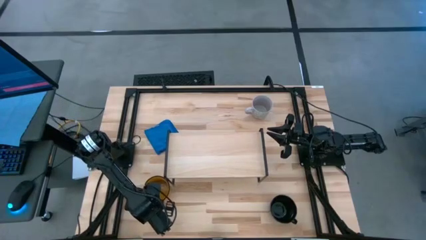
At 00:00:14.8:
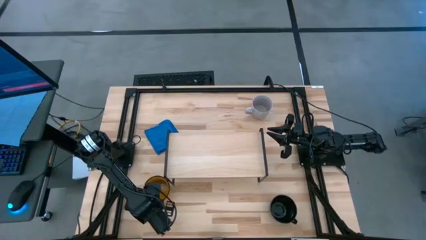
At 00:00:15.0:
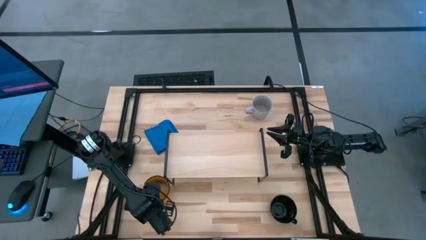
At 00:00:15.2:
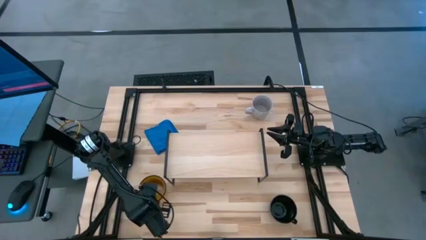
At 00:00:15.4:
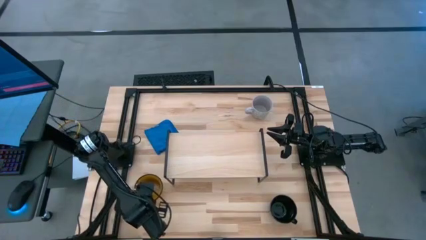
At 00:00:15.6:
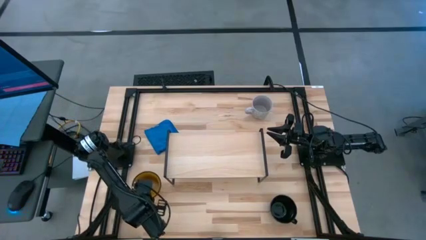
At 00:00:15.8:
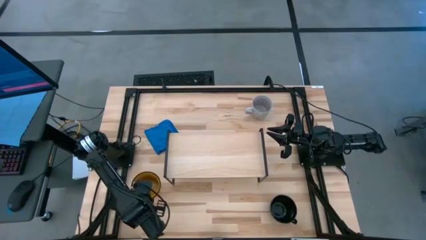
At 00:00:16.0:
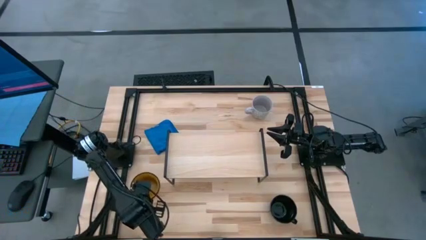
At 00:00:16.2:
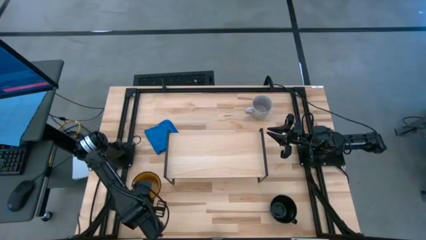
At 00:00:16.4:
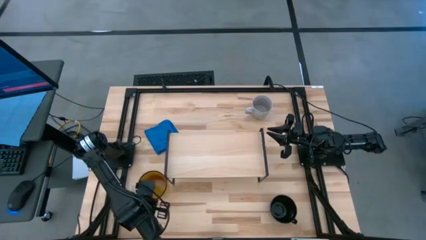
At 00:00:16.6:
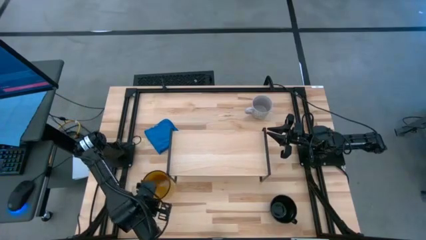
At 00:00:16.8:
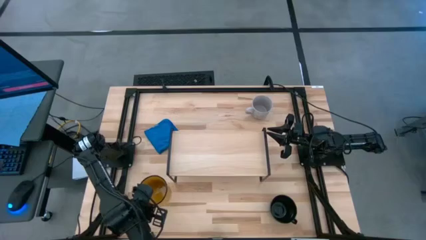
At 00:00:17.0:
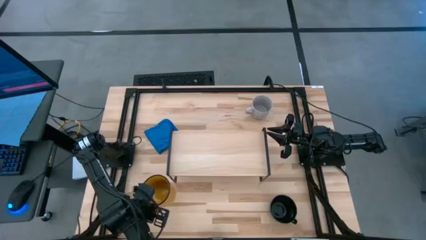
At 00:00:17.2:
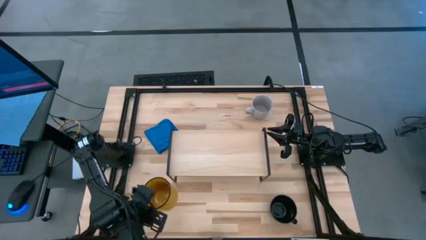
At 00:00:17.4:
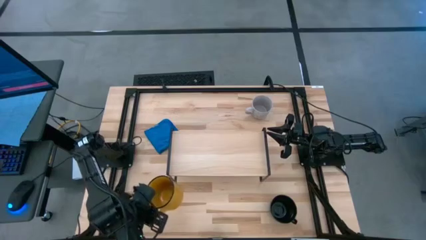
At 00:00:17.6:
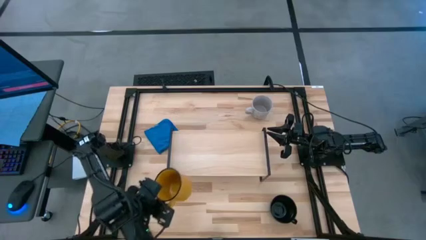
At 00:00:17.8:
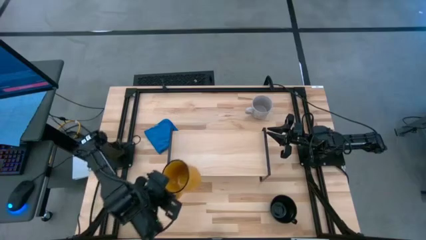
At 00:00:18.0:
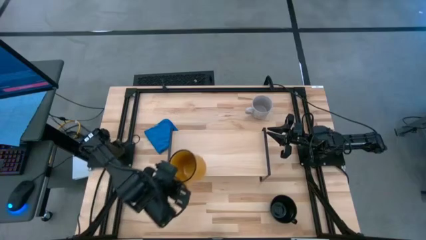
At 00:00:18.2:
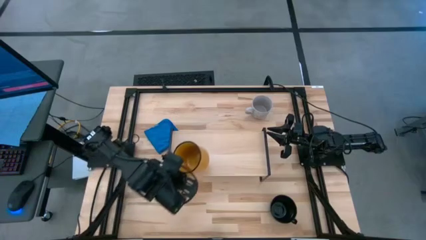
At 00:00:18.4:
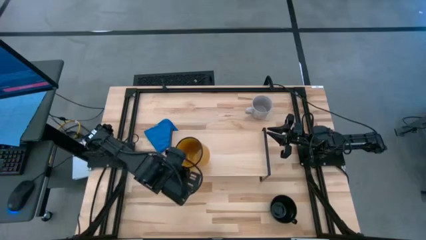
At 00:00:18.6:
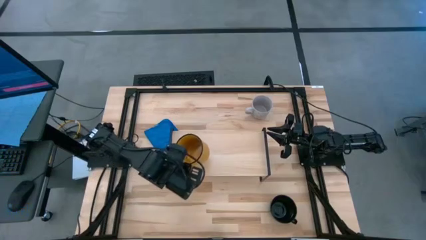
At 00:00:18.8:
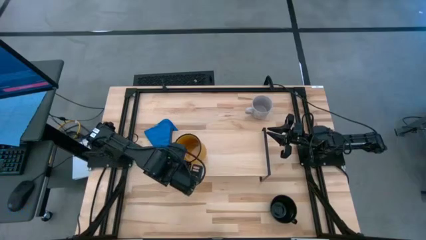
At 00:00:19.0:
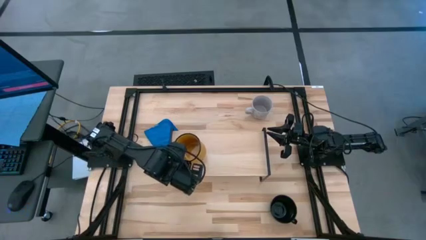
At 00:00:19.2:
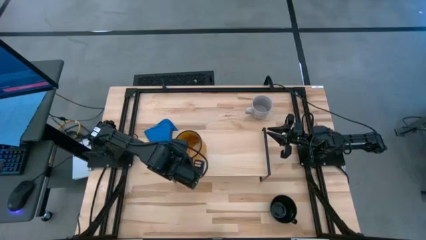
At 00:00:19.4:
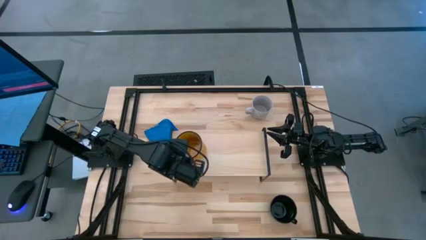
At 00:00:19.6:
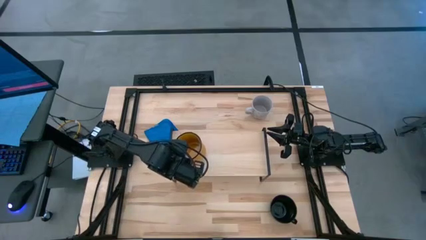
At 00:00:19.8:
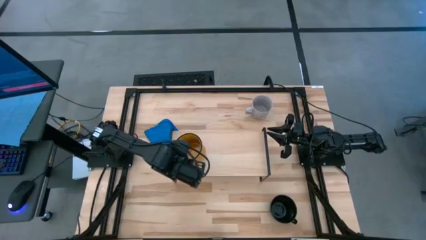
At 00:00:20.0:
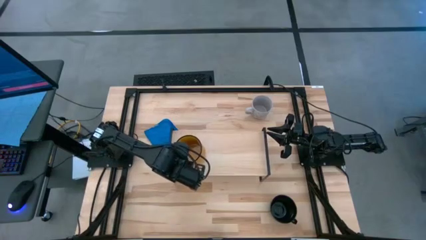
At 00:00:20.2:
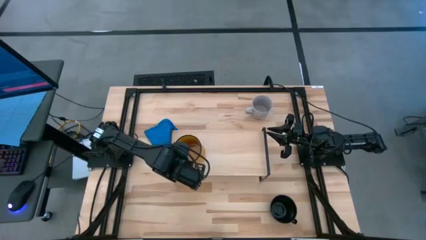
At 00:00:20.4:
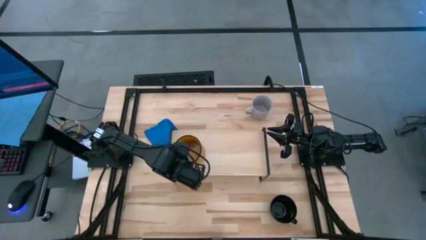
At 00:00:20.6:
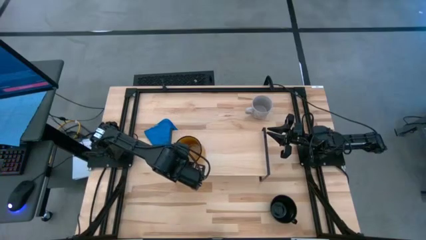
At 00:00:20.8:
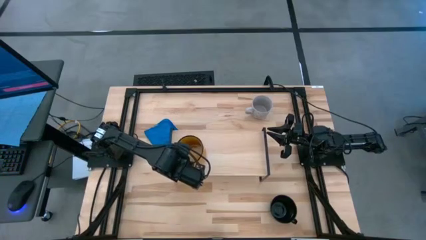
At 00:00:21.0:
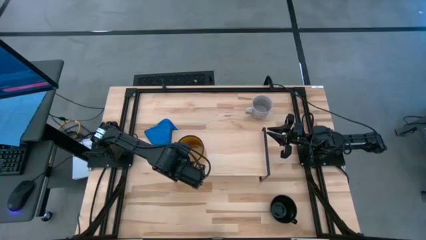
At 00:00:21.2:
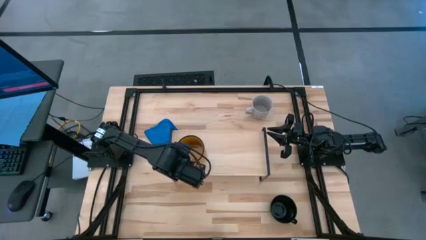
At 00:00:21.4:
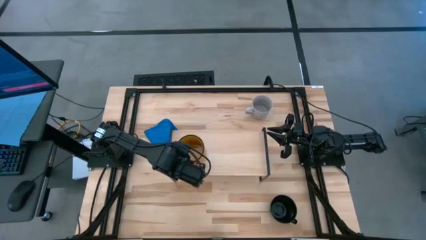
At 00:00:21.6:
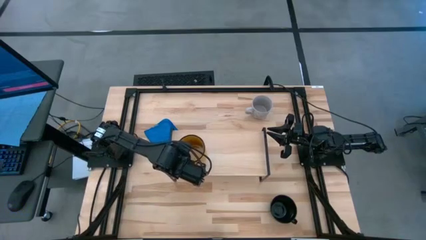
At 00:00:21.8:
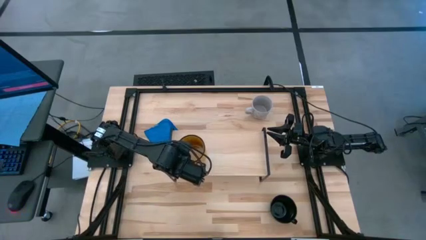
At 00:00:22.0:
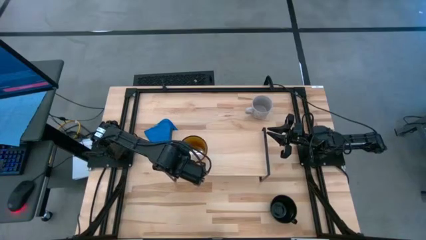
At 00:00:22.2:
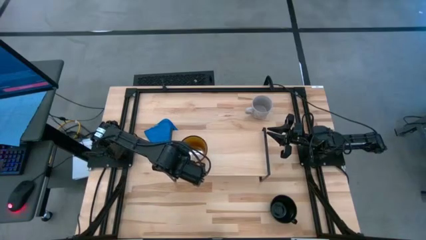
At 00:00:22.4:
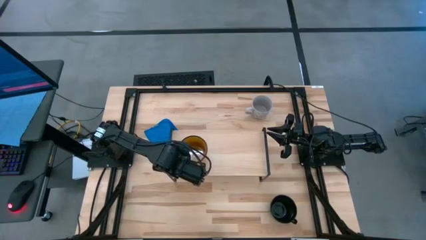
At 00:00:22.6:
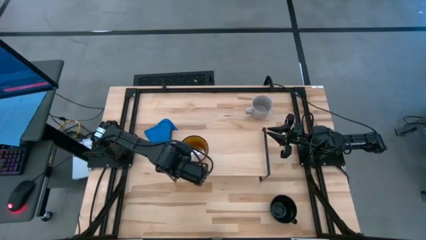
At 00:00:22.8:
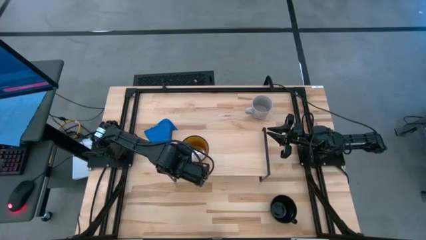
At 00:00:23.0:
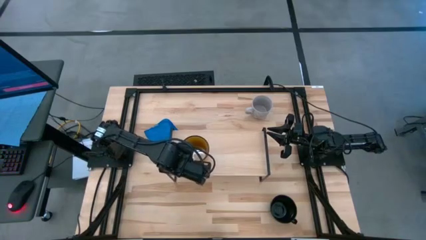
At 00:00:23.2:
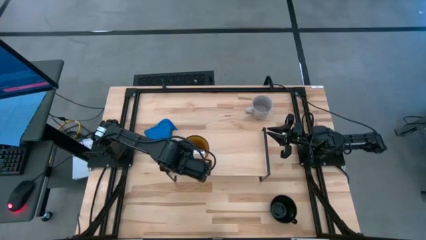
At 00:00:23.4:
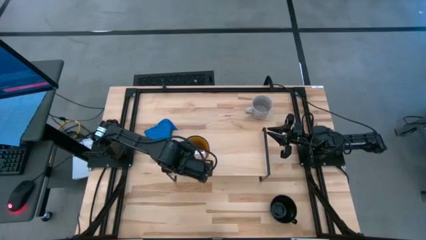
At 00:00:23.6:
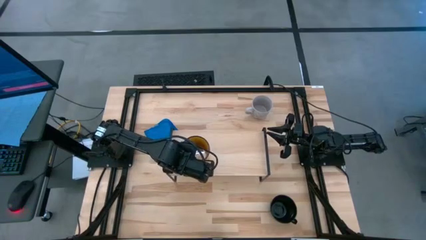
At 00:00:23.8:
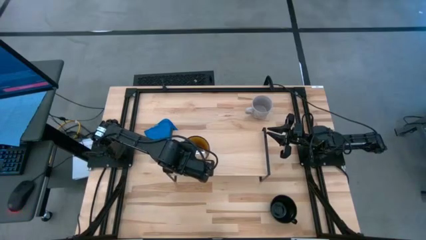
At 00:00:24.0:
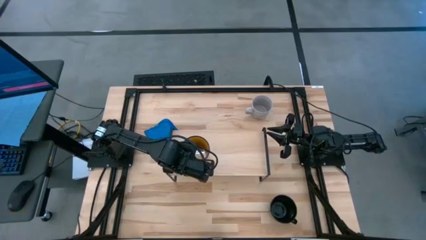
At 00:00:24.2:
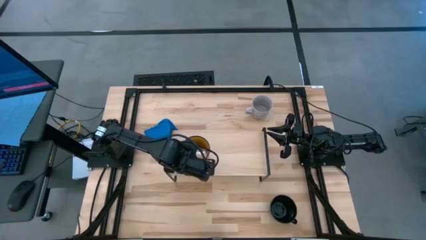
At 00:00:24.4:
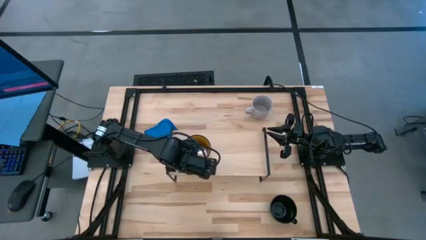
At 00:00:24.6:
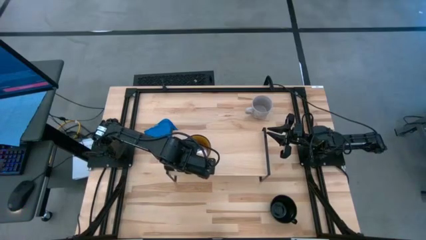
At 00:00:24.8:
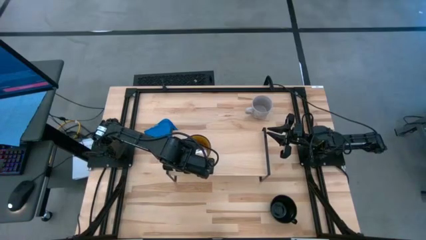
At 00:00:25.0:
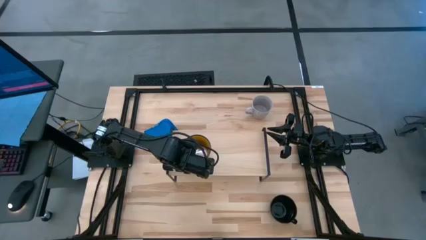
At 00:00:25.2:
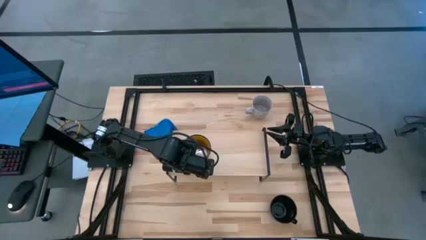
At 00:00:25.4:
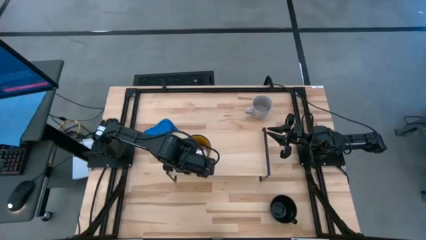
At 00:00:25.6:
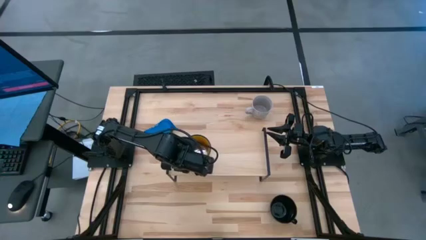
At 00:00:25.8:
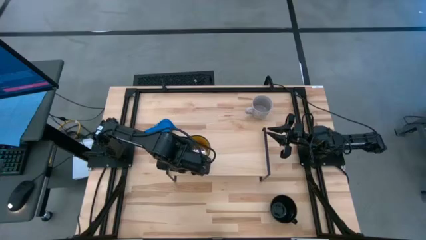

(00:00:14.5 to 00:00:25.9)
Task: Stack small to large cups/mugs on shelf
Put the yellow cup on the shelf

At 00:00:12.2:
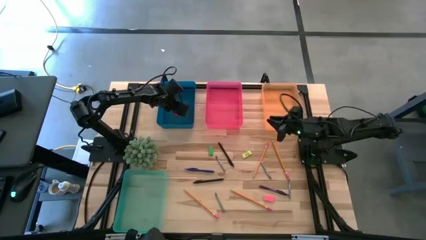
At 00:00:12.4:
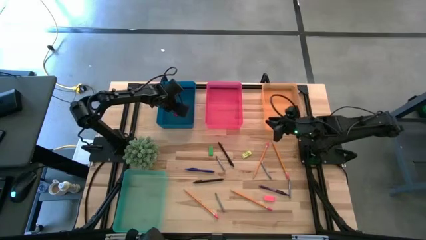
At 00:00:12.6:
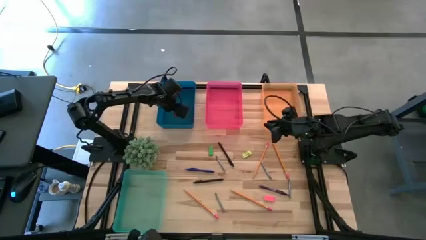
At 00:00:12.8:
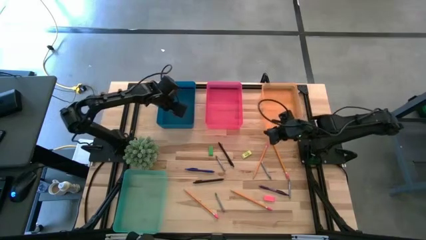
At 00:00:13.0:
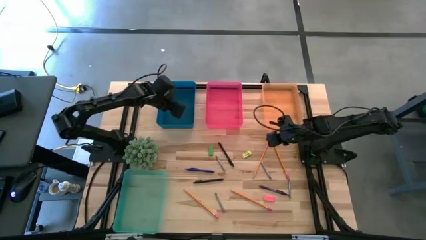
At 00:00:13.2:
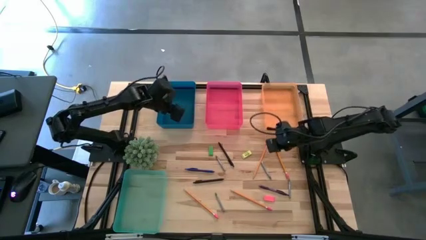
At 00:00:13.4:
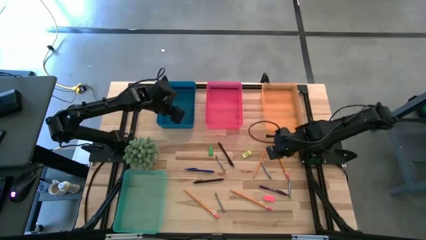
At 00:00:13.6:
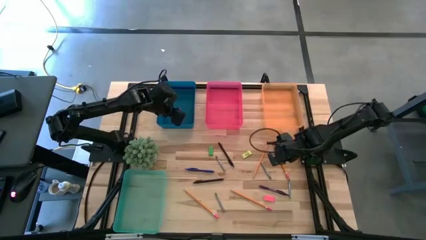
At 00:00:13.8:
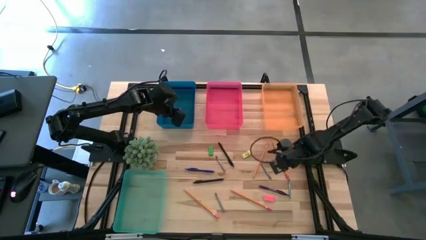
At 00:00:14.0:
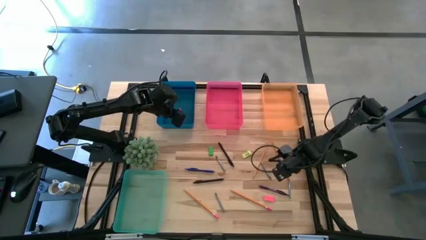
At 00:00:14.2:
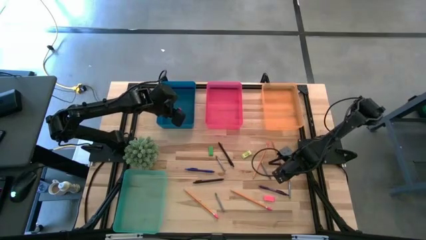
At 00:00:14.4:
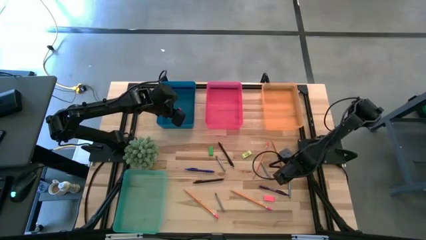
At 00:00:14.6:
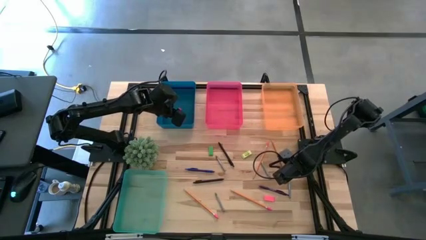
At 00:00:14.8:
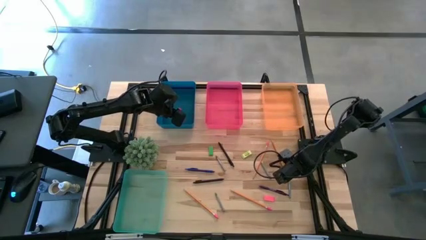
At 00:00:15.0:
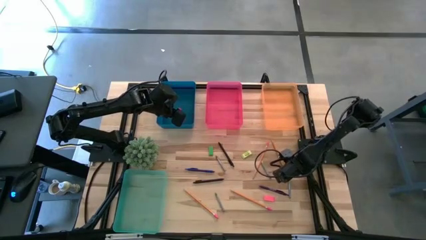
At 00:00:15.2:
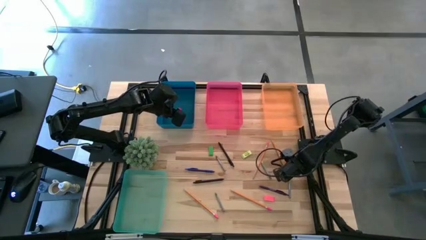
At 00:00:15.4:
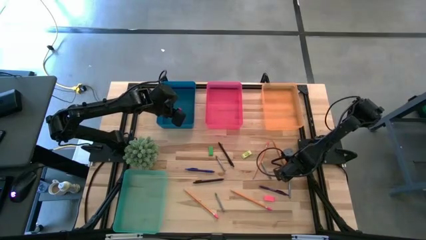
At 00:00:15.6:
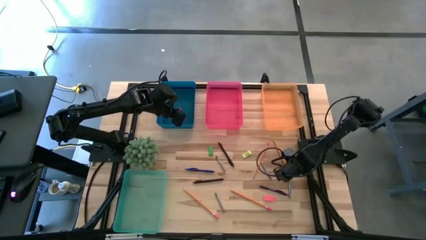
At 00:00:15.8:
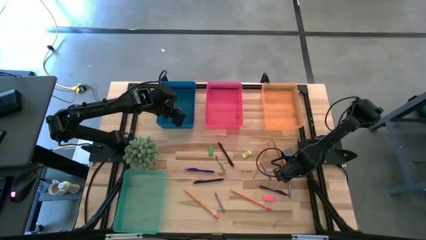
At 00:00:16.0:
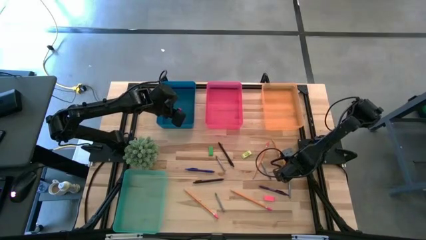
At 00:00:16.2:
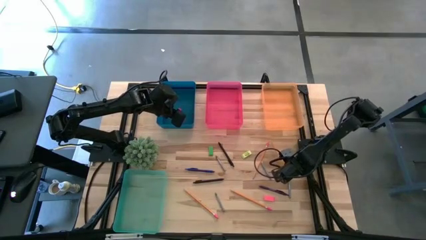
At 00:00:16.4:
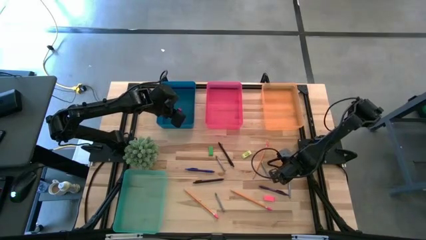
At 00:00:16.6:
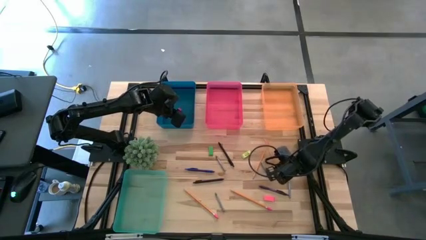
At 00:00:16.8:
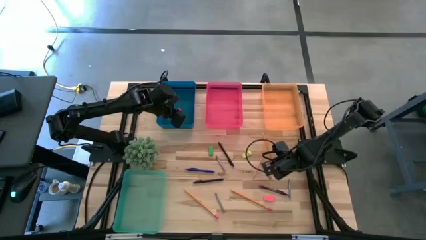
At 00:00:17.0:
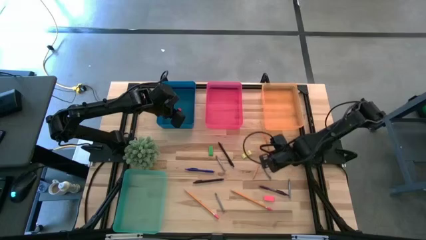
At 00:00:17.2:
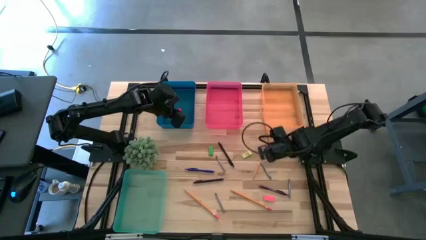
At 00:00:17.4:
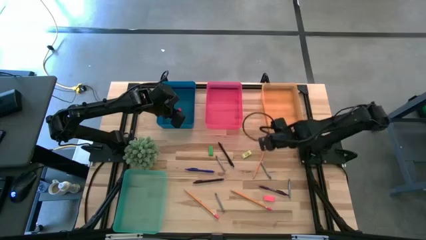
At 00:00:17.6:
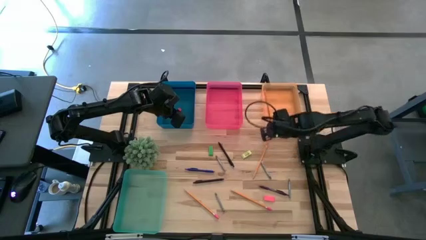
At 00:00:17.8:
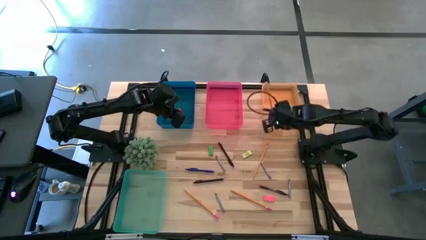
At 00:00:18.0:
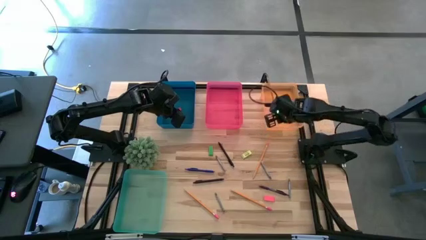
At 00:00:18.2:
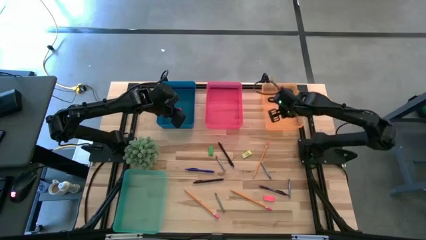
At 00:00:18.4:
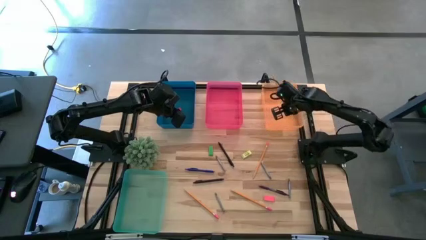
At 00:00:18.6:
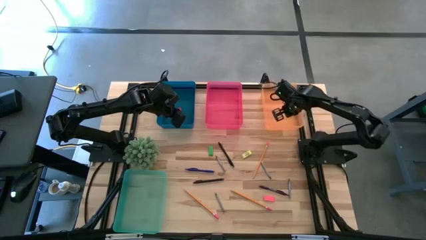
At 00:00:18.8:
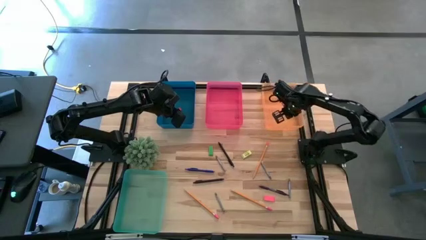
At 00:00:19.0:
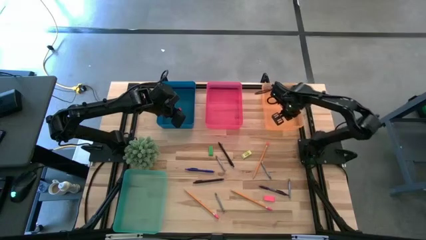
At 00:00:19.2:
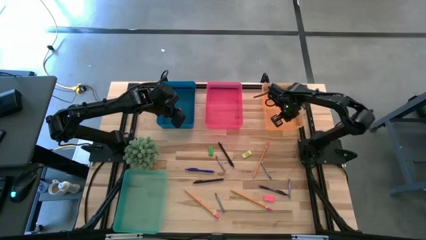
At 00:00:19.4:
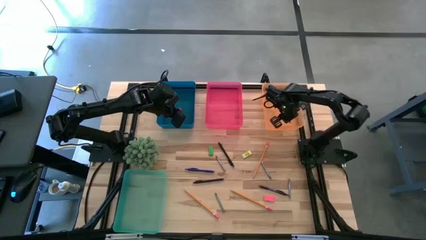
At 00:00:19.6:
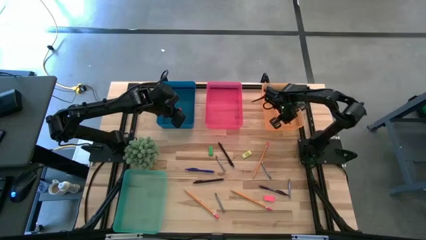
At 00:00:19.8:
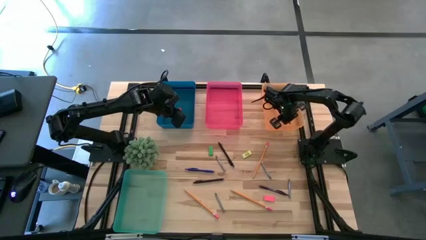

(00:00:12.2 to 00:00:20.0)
Task: Sort crayons/erasers/pens/pencils in bins
Put the top right pencil into the transparent orange bin
